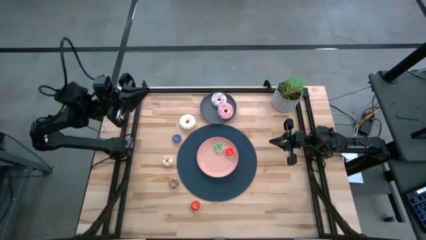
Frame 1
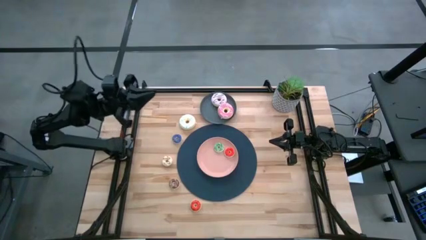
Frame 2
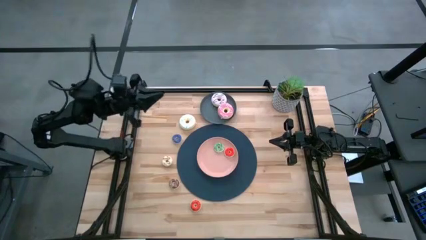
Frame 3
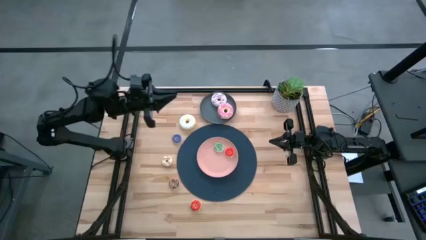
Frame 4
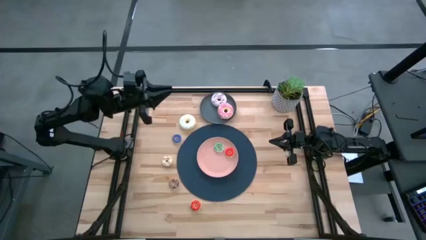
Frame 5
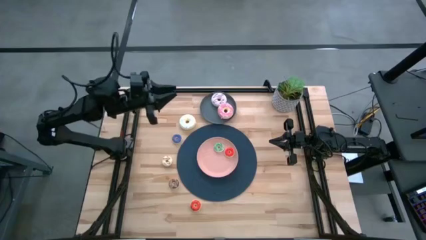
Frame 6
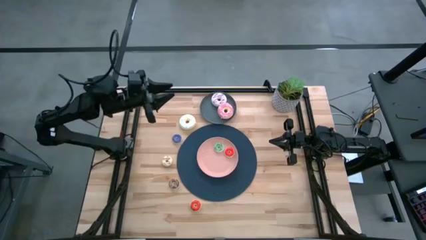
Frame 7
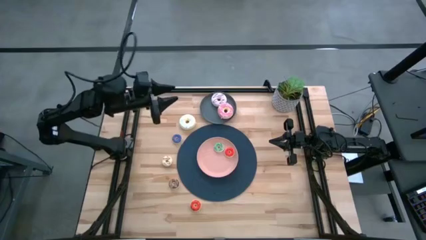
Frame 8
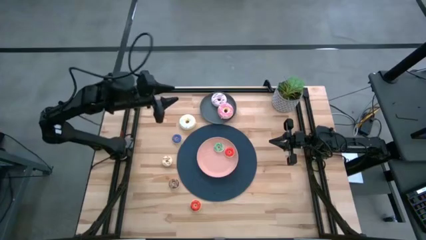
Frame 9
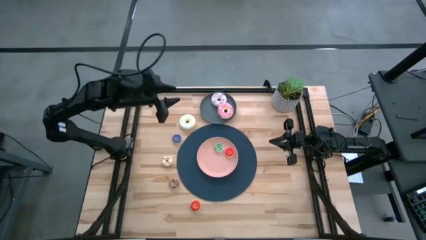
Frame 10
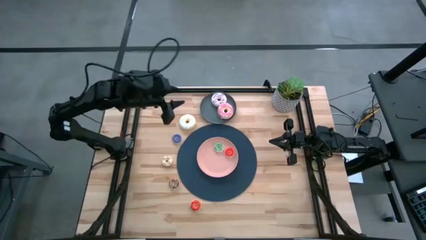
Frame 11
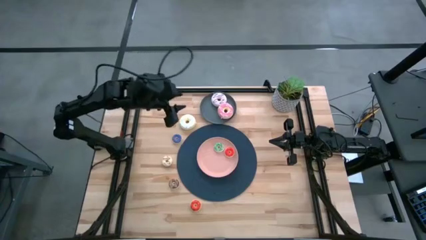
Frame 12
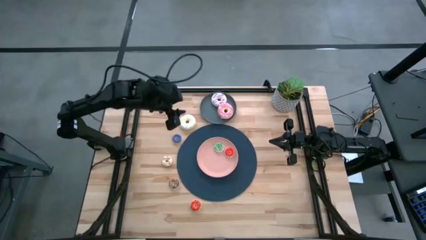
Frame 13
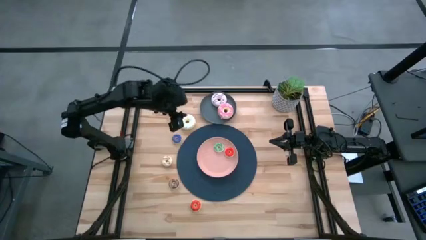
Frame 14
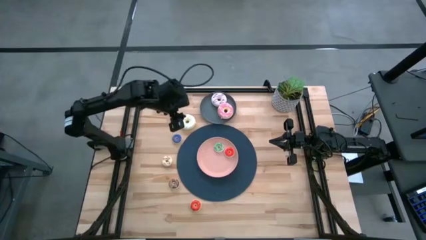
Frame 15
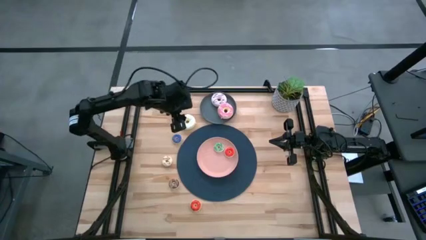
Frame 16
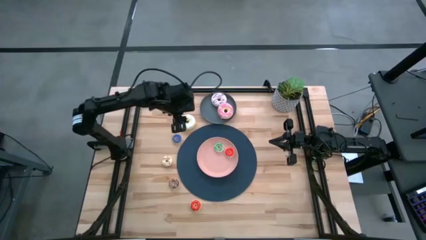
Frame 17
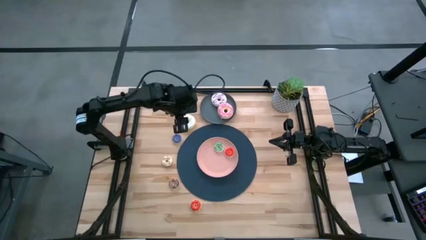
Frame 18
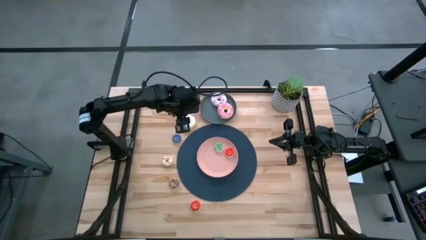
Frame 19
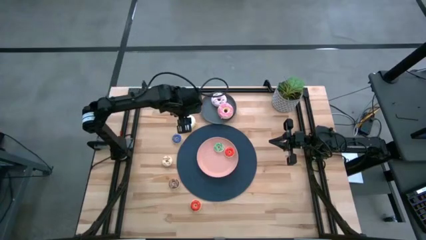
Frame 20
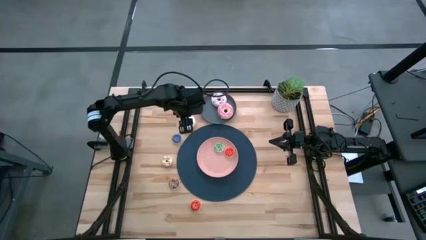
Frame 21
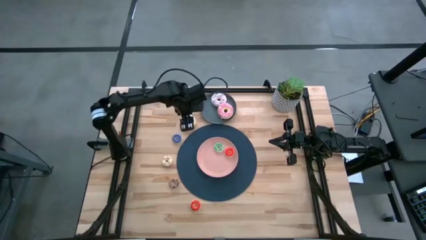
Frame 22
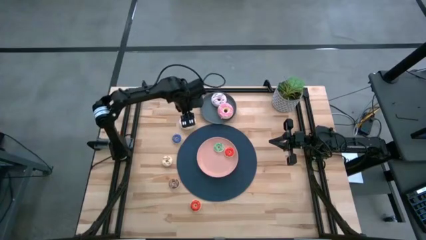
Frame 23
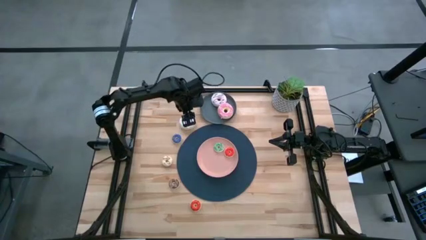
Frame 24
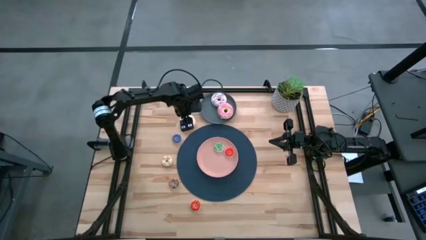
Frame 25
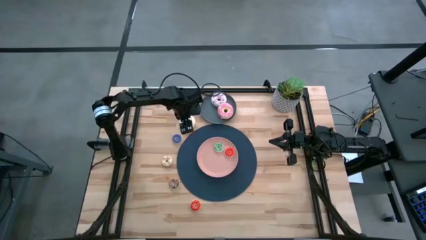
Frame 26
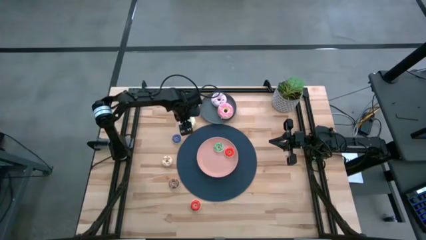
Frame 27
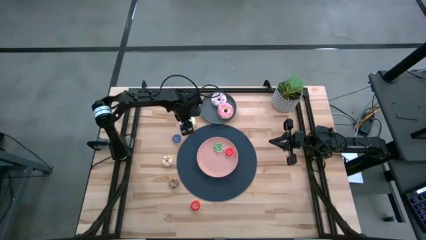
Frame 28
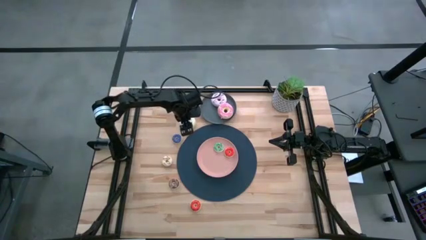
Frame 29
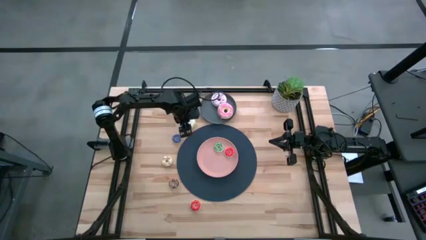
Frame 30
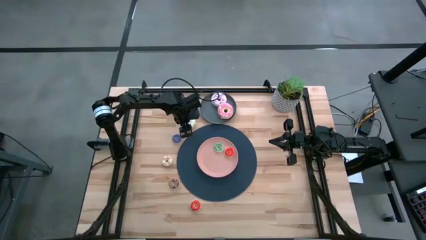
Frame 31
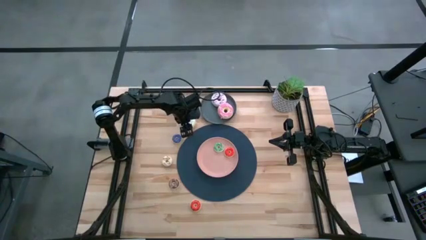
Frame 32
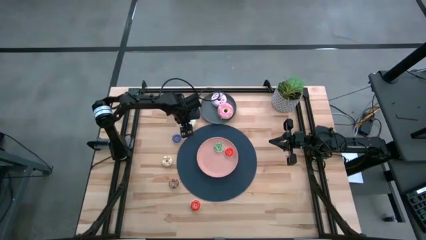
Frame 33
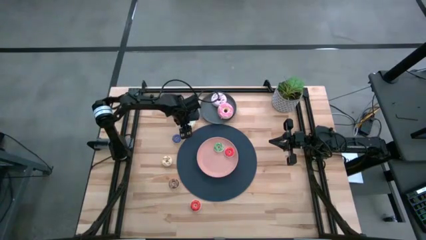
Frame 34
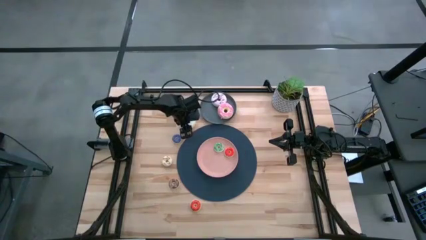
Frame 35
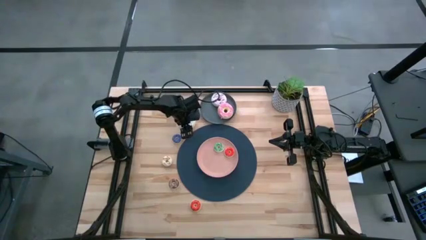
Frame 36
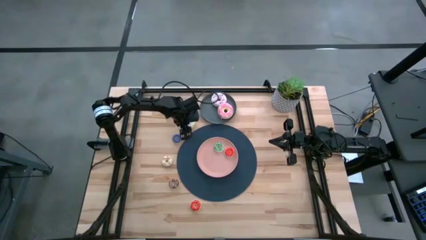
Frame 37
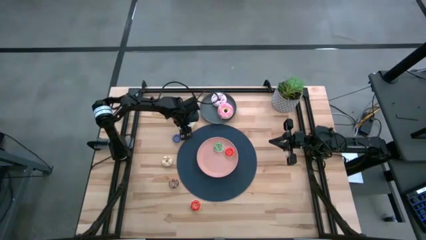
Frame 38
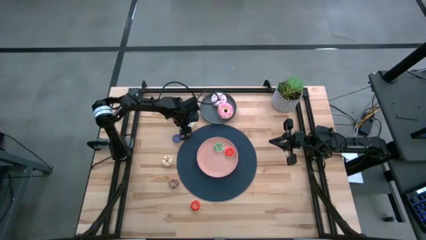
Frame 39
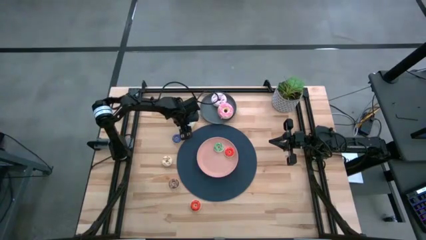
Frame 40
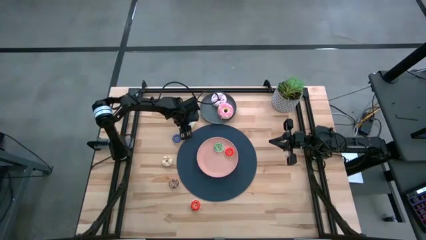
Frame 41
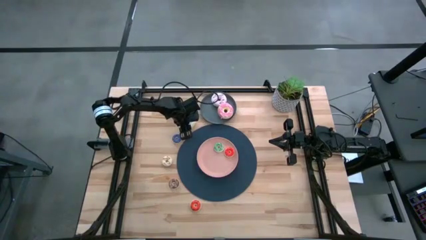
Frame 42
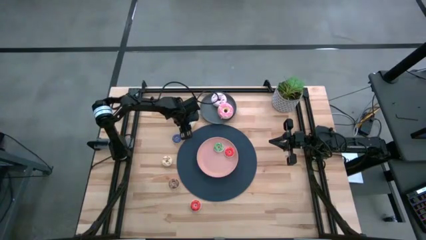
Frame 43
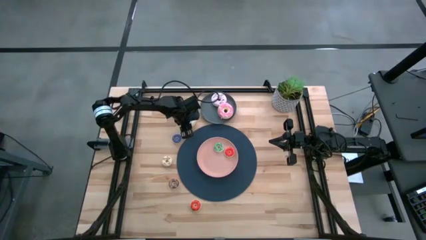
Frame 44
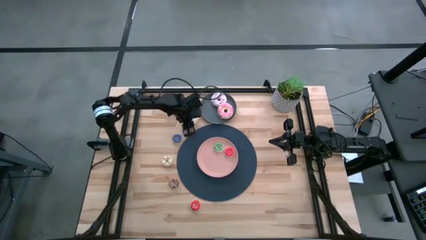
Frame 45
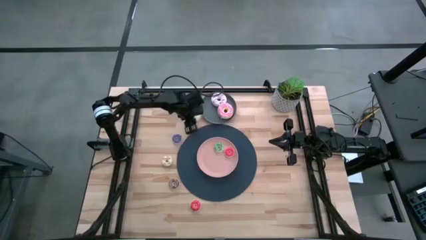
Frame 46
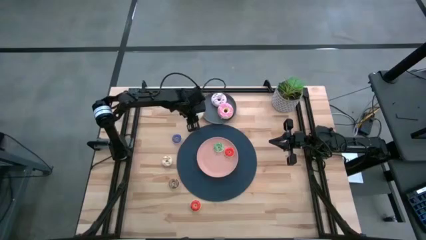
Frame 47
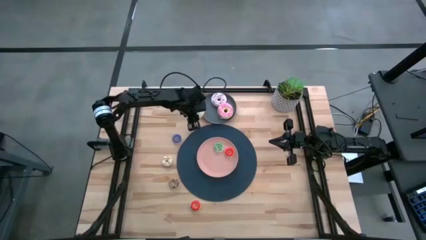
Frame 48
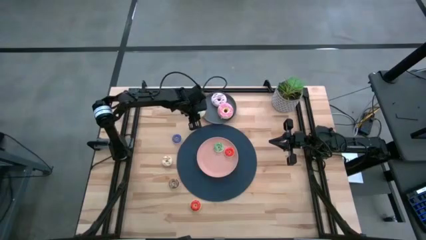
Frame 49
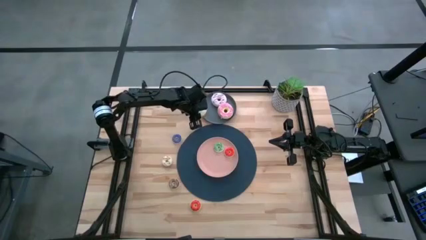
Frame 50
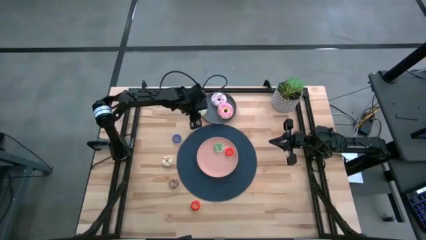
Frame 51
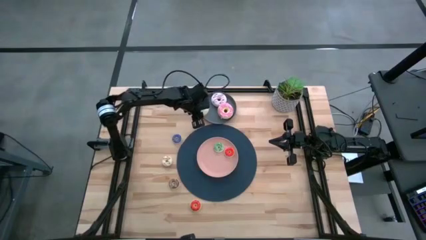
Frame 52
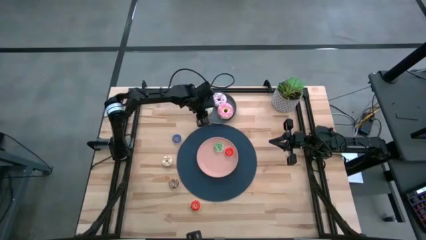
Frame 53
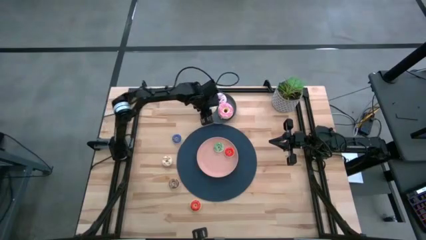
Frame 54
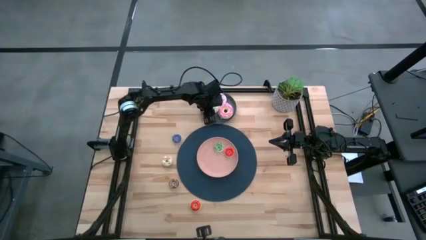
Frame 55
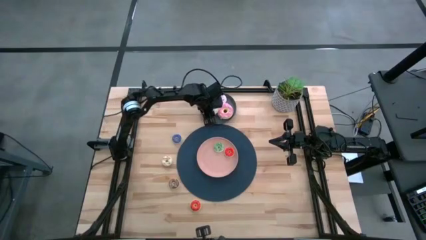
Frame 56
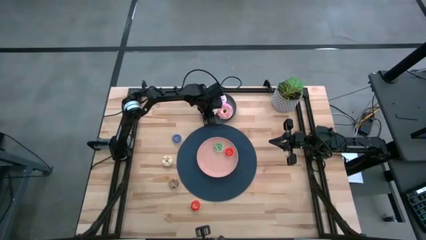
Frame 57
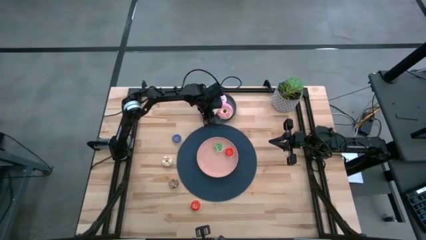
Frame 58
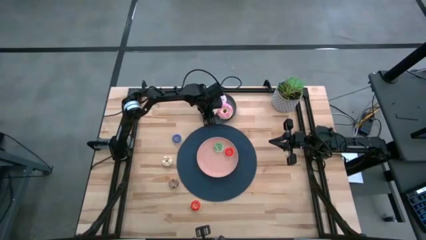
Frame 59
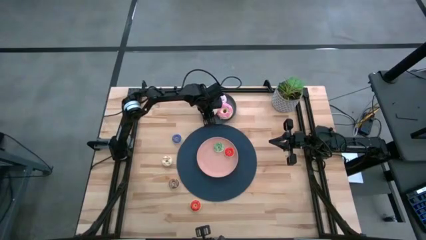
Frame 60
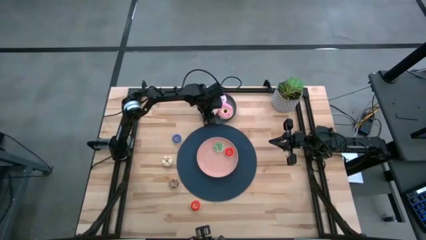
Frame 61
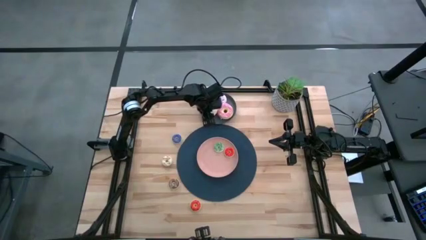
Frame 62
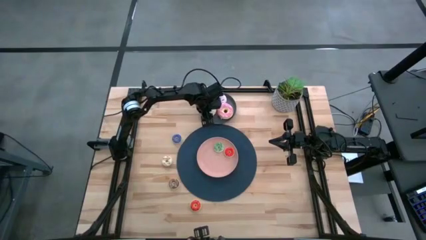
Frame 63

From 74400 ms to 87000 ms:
Task: Pick & Place donuts
Put the large white donut on the gray plate

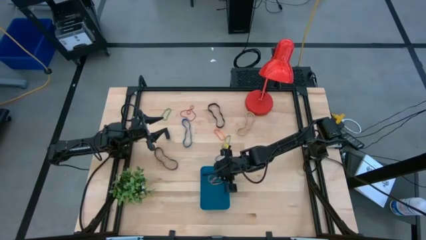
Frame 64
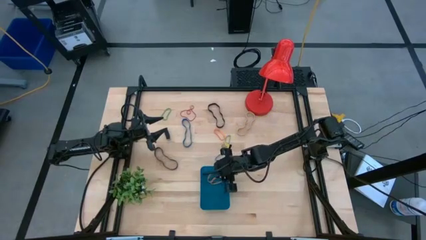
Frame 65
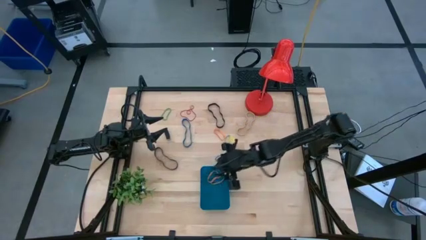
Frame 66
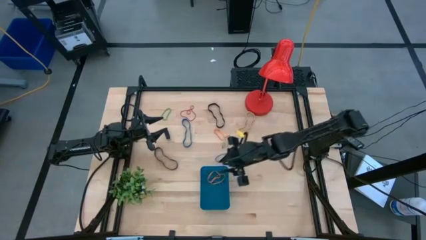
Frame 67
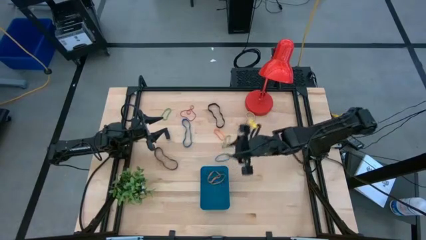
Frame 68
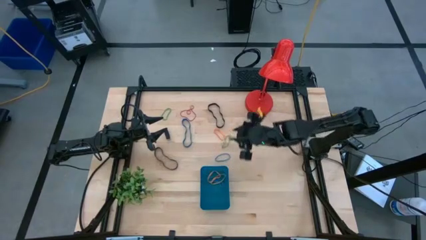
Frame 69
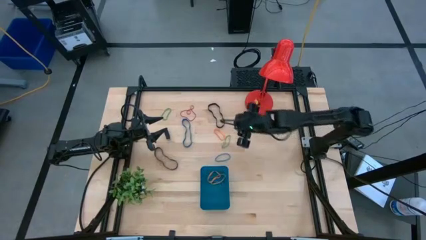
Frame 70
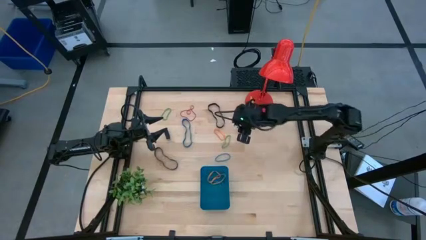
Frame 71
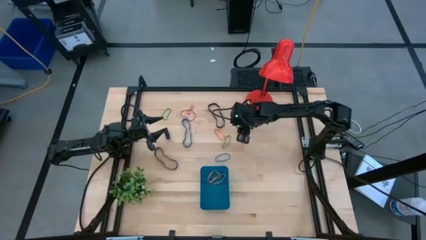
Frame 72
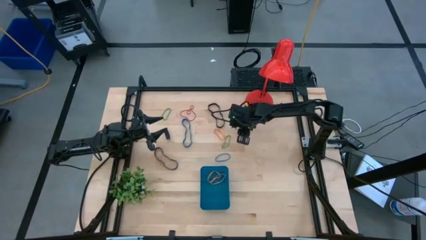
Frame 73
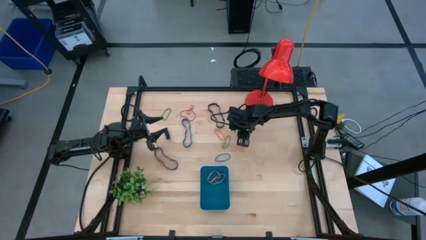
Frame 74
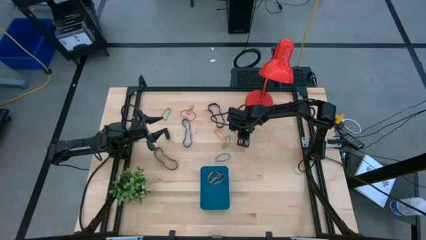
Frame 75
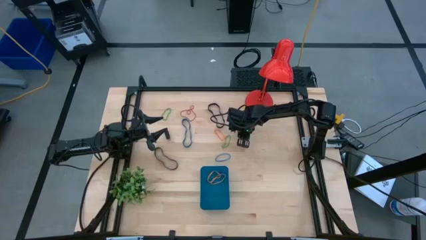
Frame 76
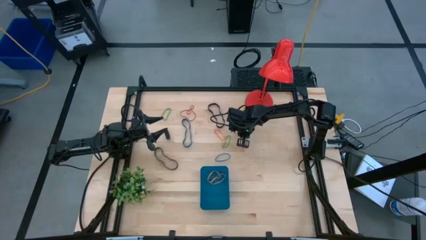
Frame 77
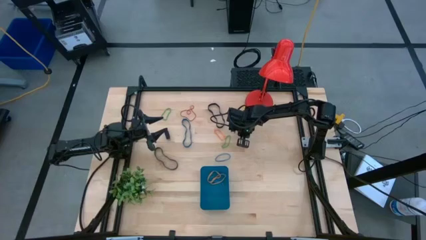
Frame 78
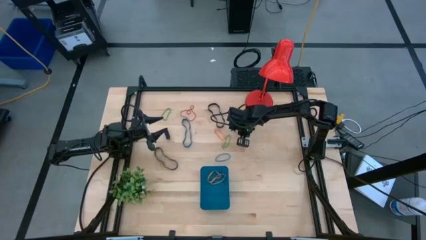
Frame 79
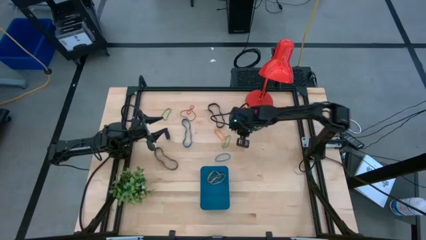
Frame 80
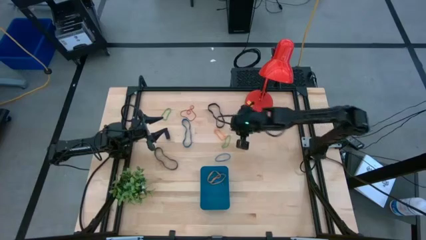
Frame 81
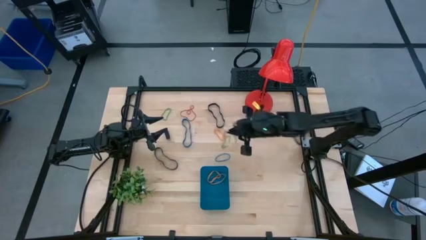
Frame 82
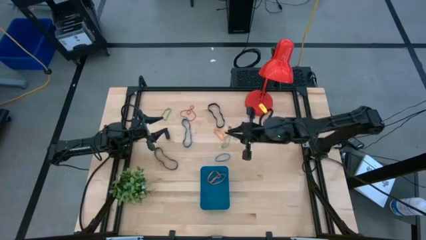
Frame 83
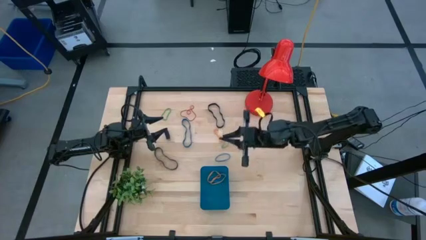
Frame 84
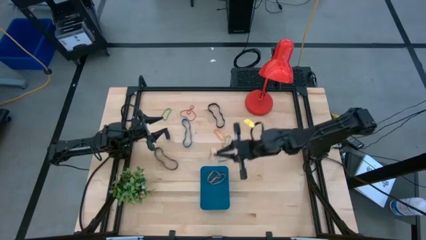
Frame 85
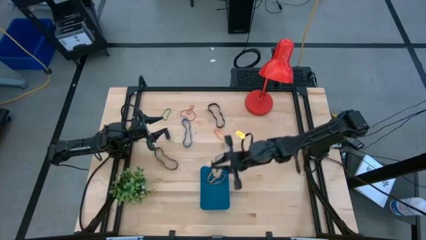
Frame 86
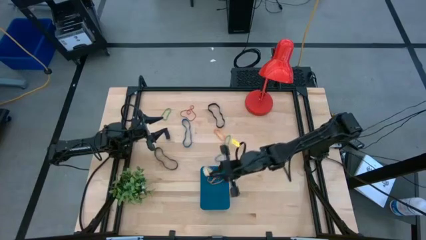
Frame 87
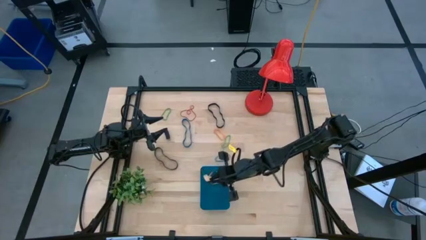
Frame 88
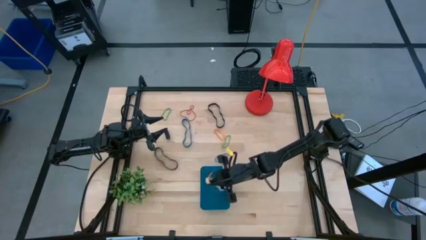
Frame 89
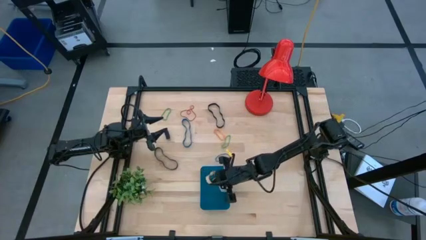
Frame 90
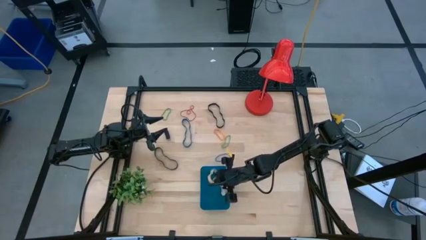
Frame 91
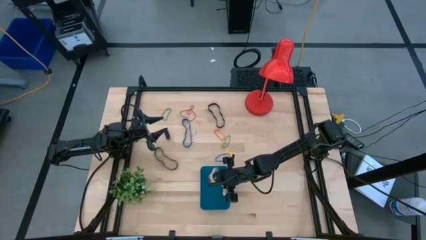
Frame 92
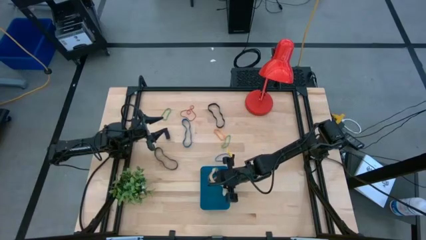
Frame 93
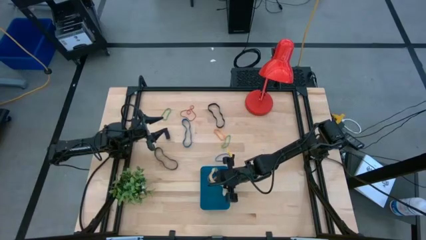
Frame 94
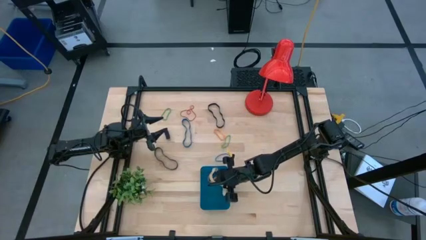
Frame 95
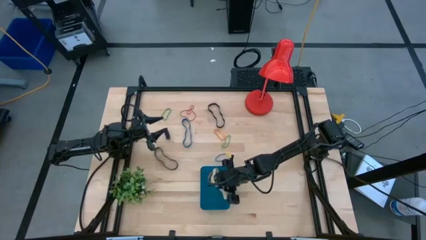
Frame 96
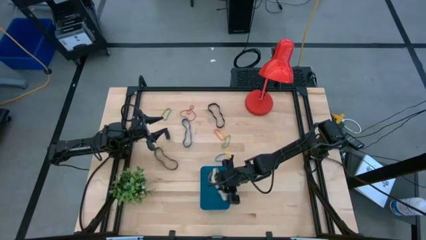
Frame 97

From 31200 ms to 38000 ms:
Task: Pick and place rubber bands into bin
Put the brown rubber band into the blue bin
